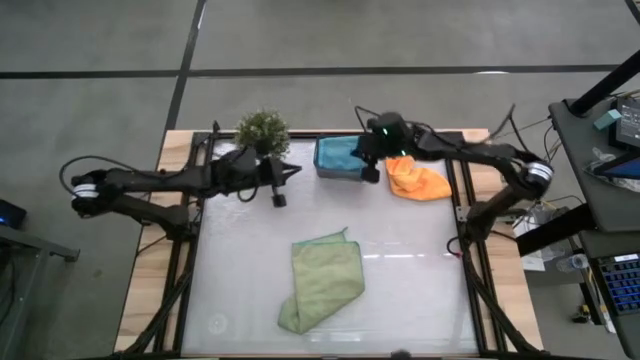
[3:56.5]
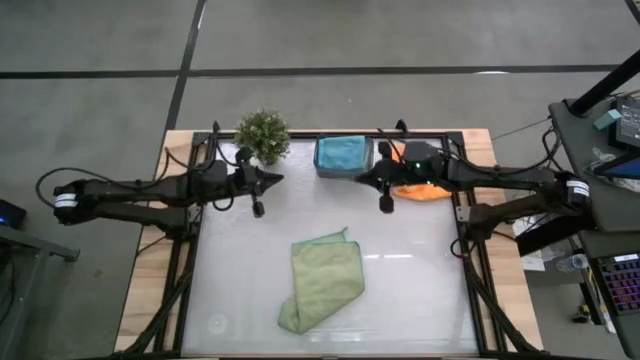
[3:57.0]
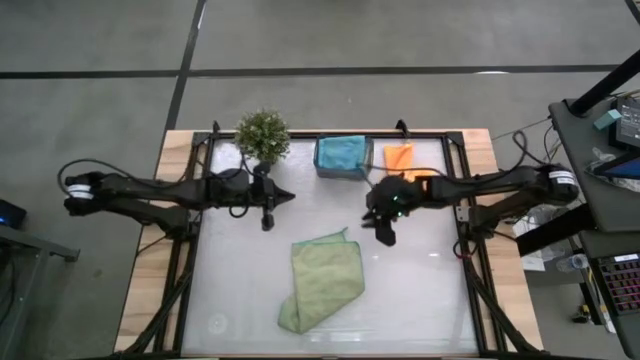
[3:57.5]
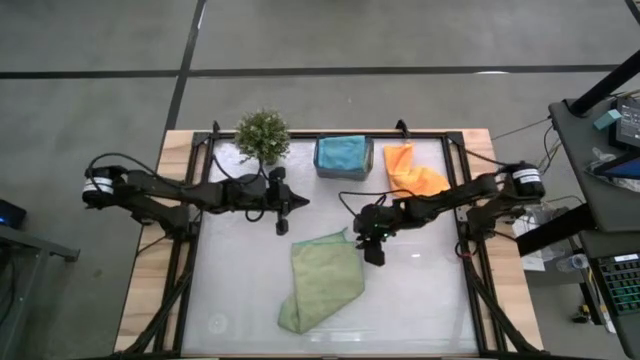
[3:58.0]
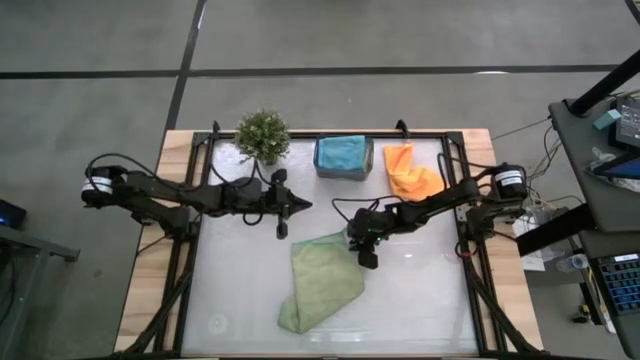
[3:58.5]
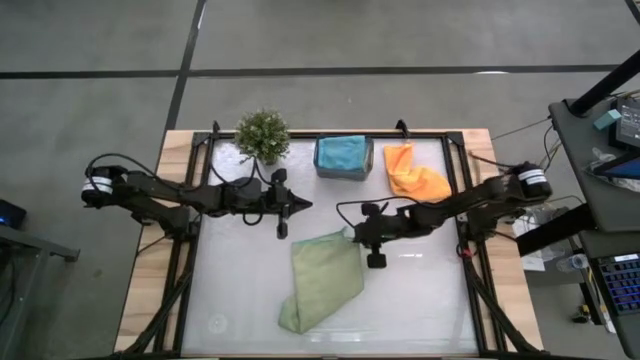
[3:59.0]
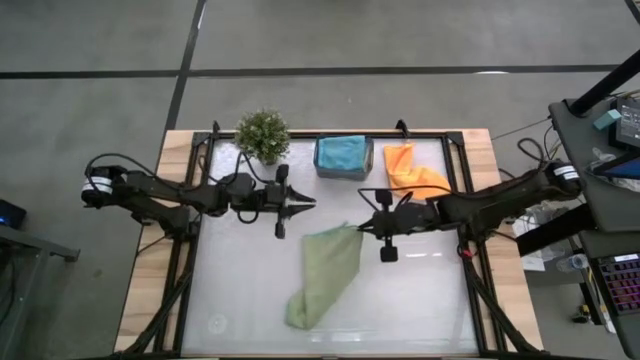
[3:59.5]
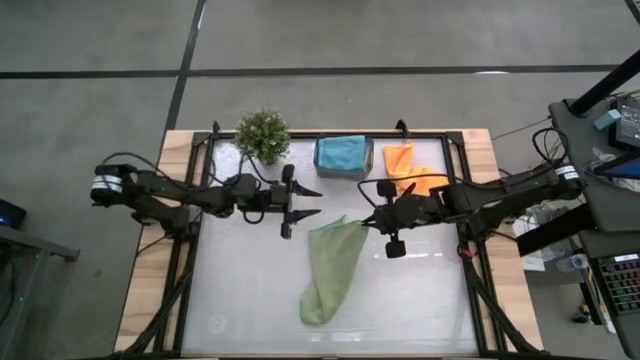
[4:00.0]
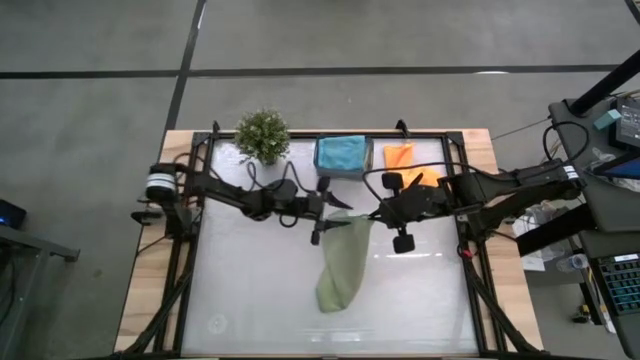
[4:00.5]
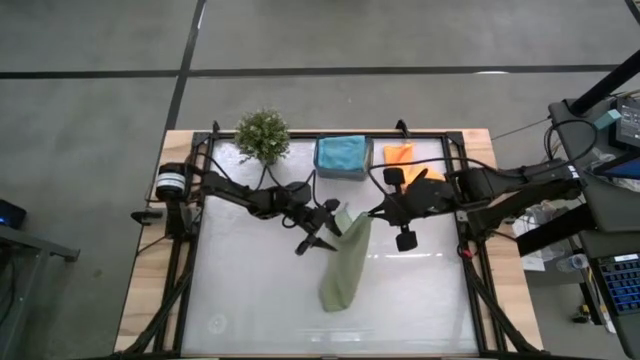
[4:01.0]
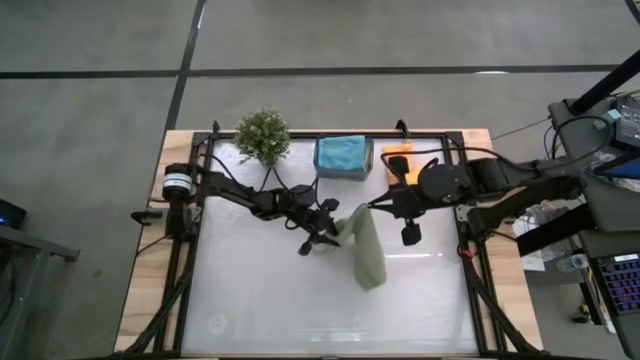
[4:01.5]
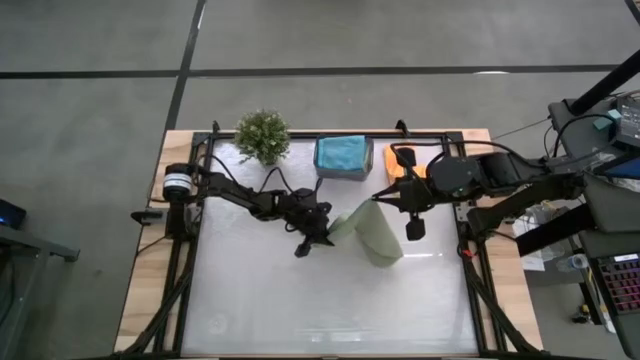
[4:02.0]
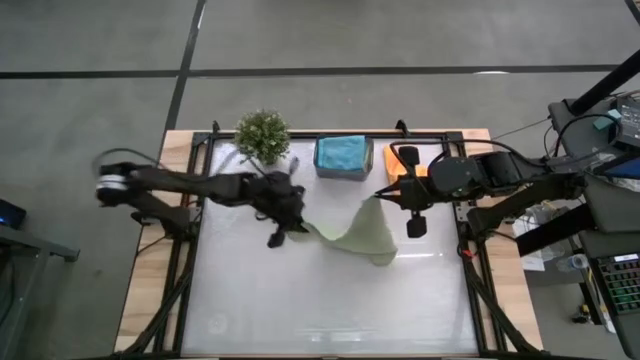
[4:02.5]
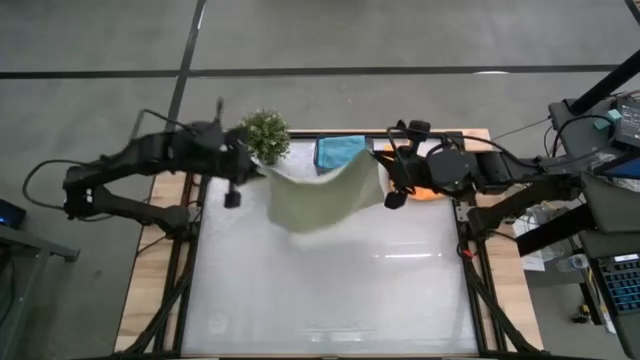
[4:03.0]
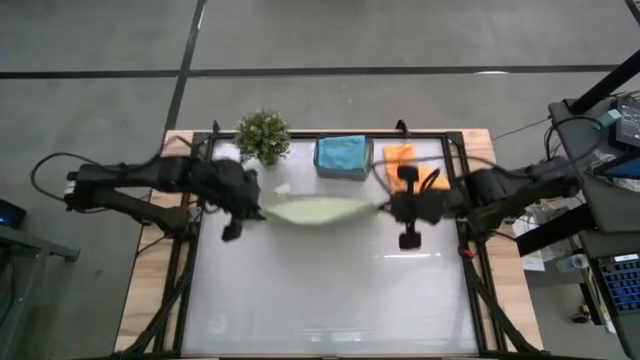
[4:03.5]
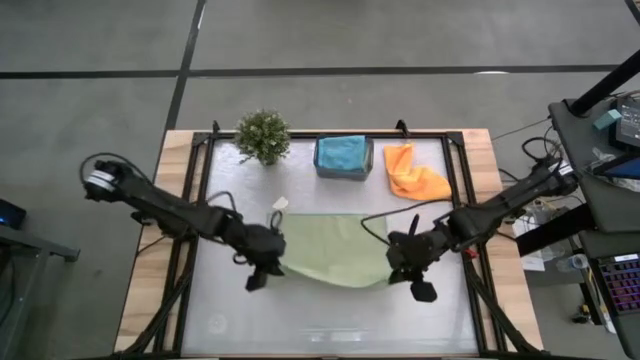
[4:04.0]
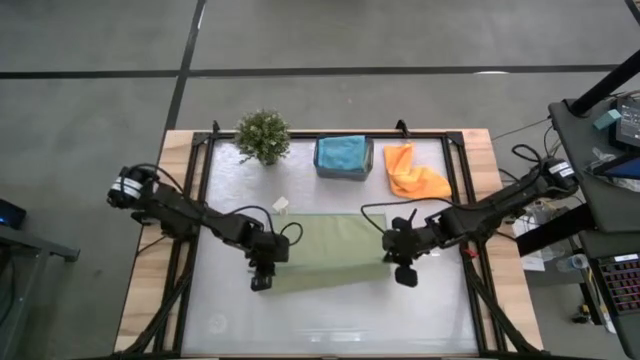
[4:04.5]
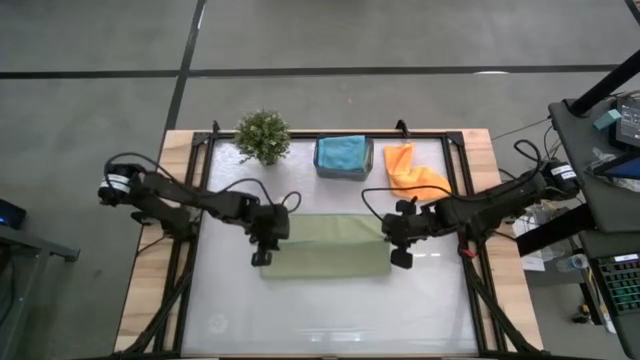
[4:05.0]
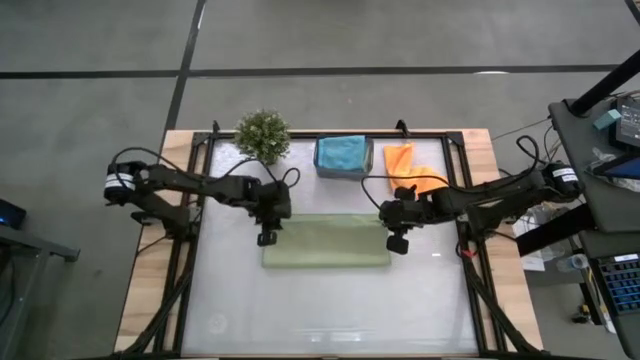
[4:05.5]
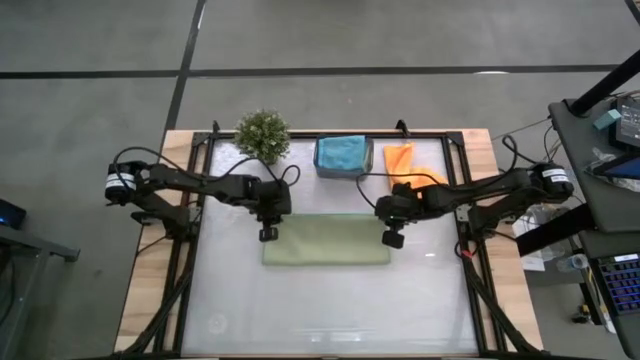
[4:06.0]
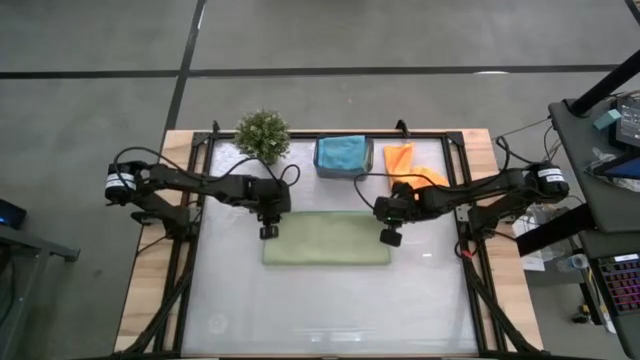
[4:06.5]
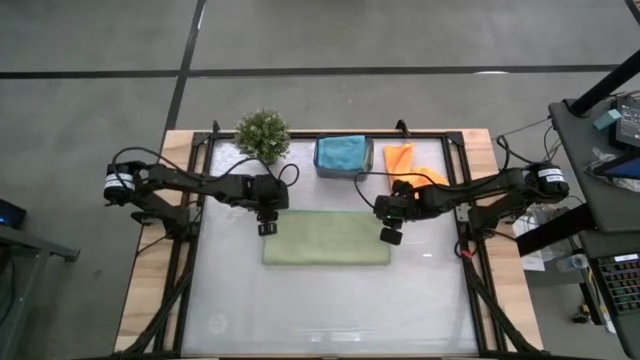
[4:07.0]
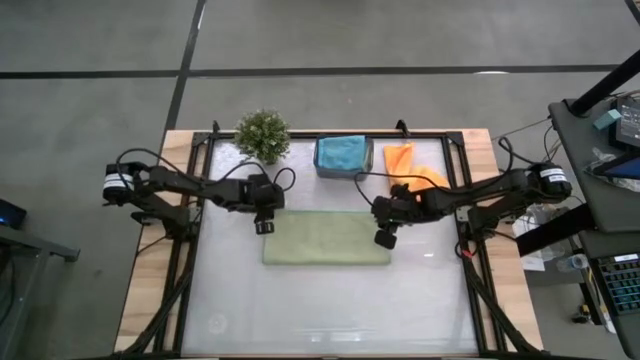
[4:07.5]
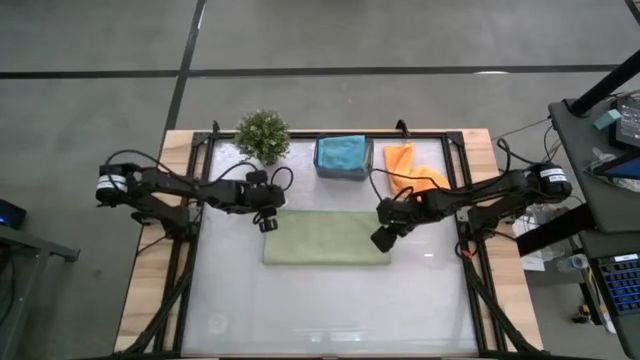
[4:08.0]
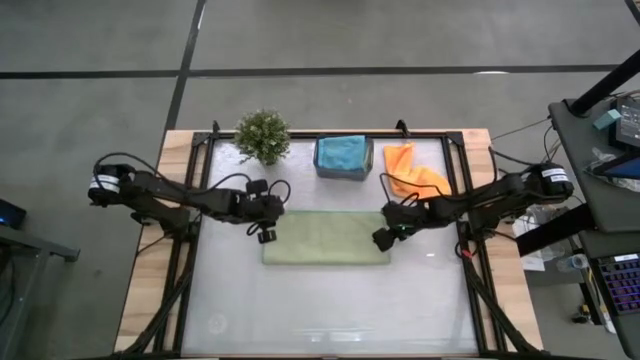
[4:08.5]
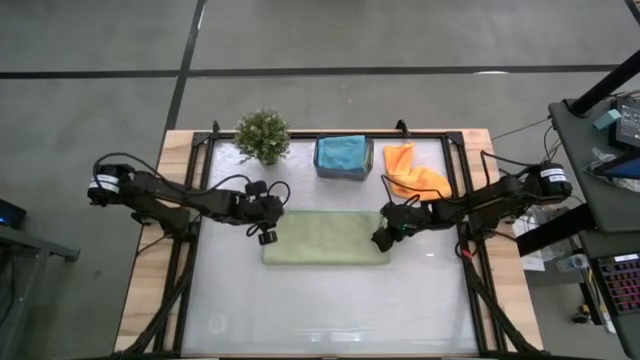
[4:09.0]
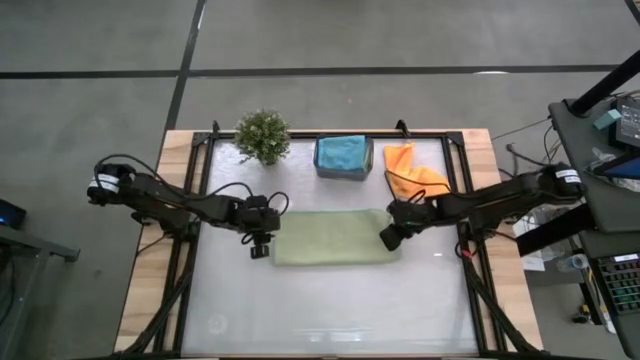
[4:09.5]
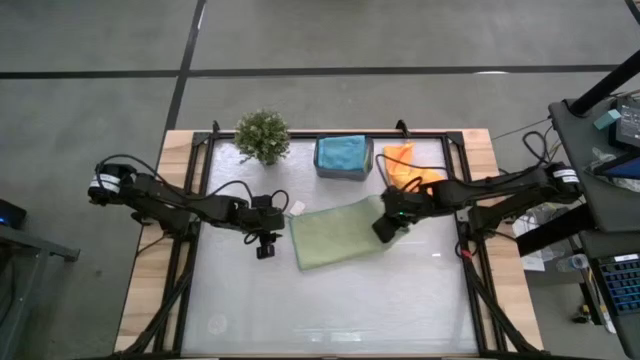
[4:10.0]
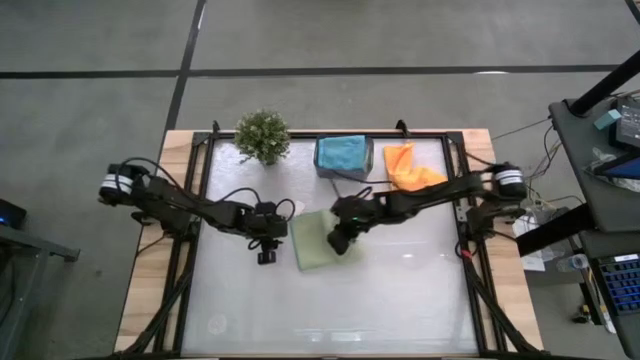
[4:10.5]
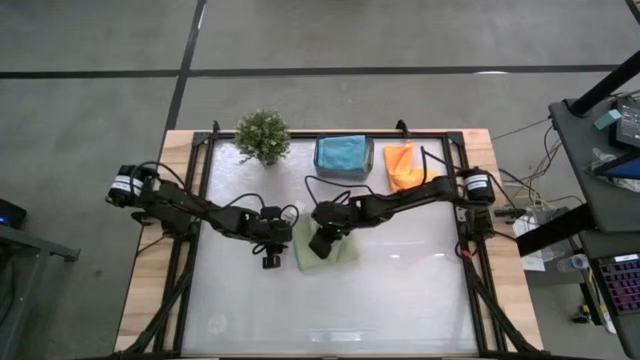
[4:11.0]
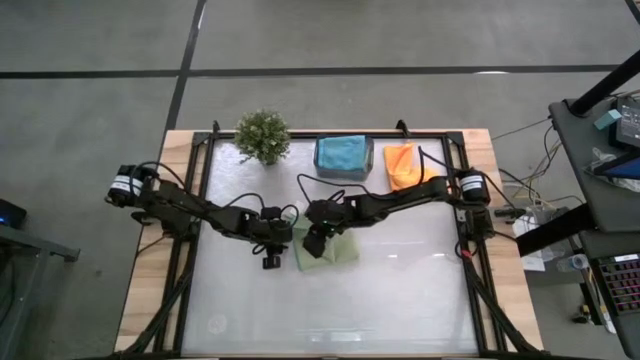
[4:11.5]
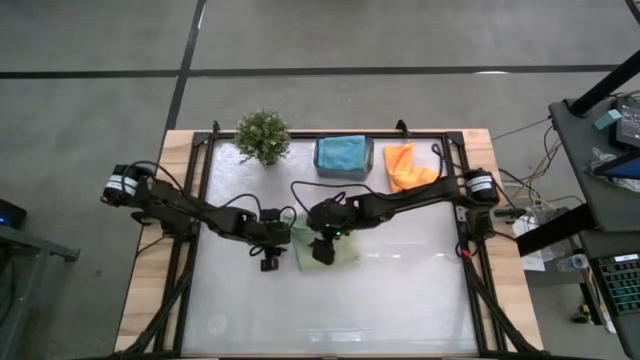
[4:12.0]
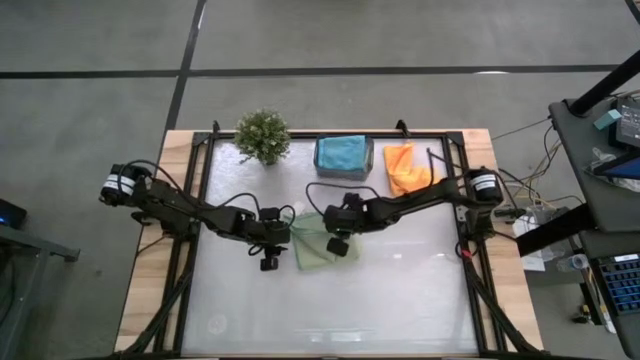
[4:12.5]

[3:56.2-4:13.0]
Task: Fold microfiber towels
Fold the green towel

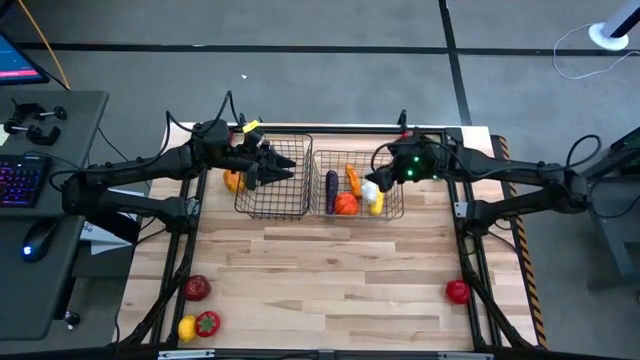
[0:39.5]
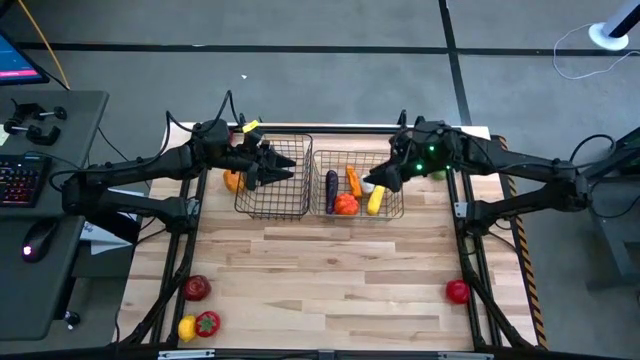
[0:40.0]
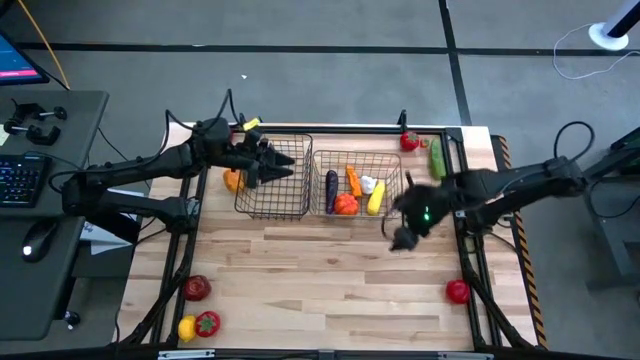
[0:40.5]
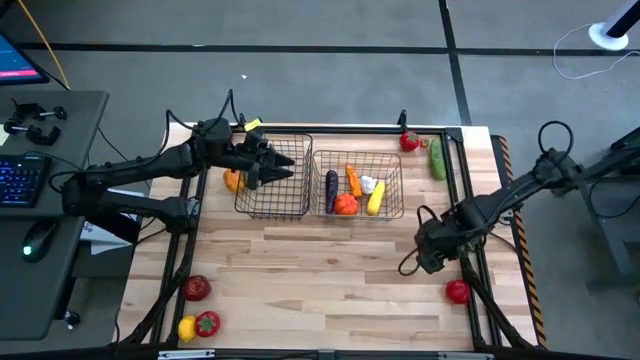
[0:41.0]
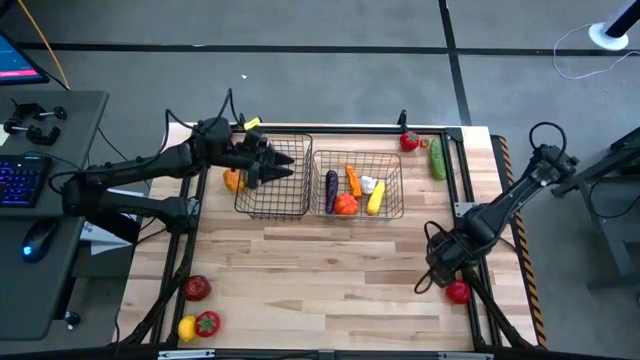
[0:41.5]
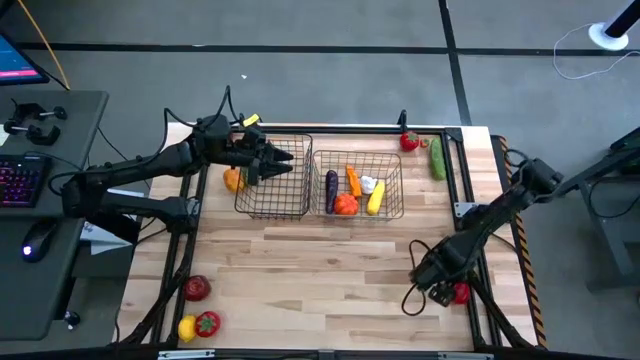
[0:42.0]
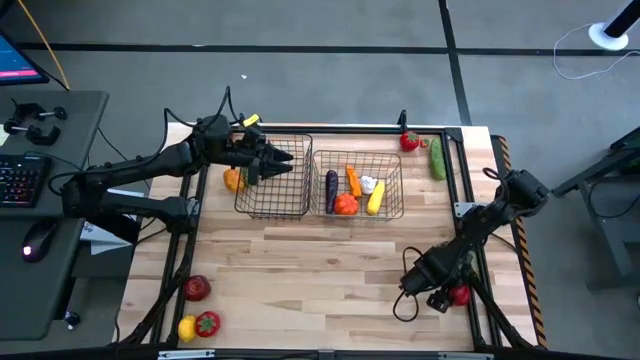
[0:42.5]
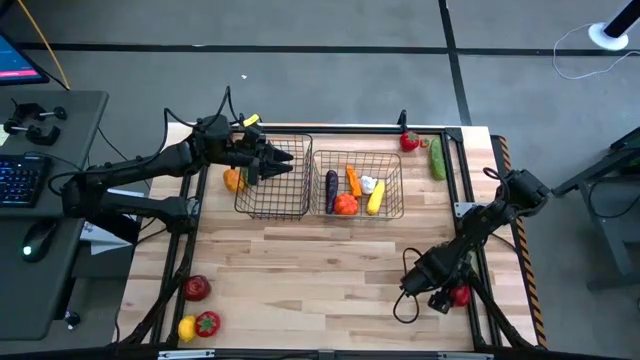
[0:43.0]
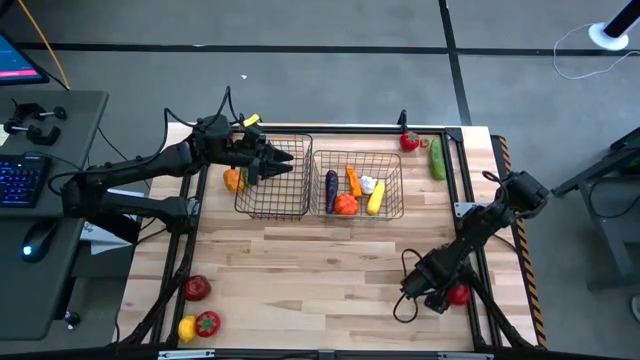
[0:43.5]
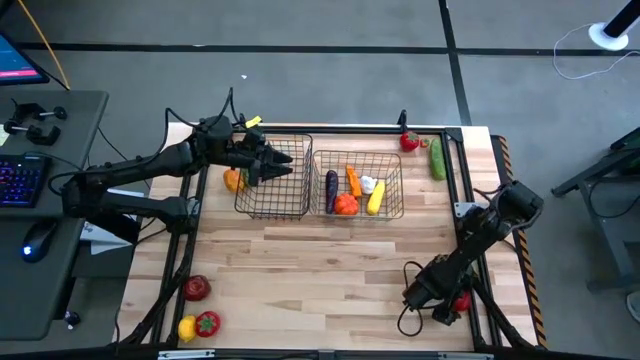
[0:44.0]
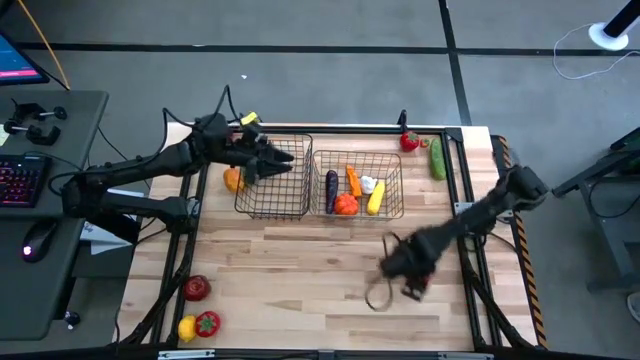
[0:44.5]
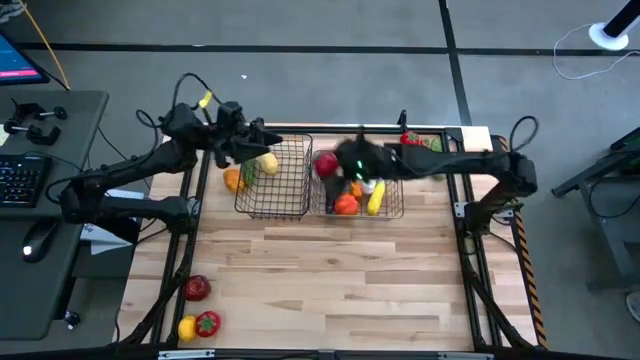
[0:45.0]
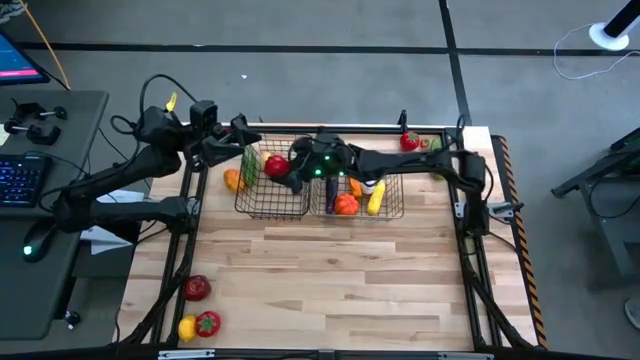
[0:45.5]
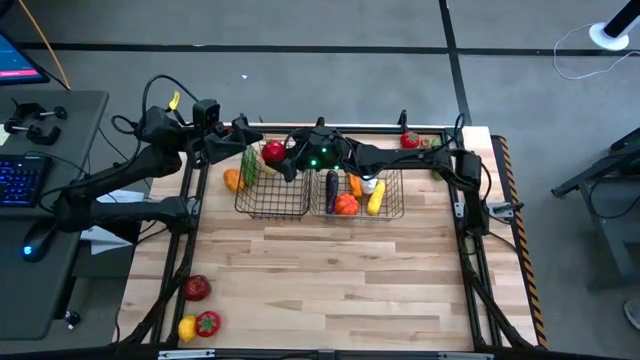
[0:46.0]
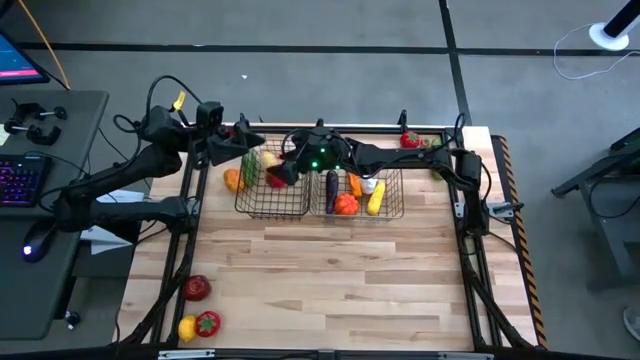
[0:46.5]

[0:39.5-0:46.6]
Task: Sort produce into baskets
Put the bottom right tomato into the left wire basket
